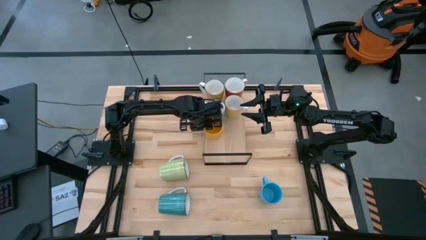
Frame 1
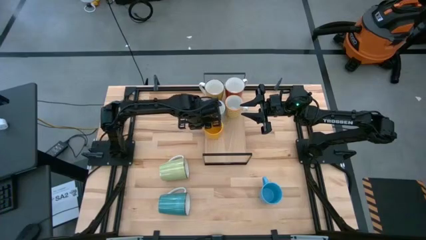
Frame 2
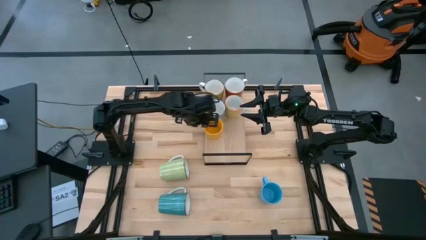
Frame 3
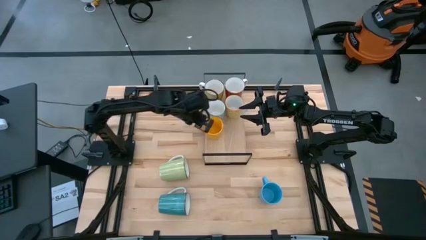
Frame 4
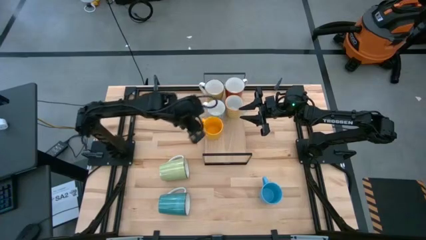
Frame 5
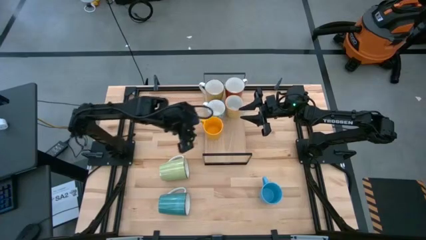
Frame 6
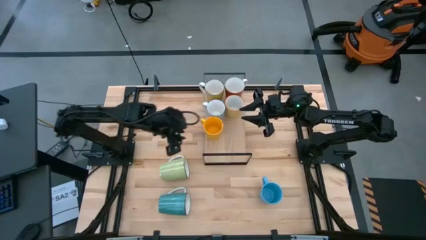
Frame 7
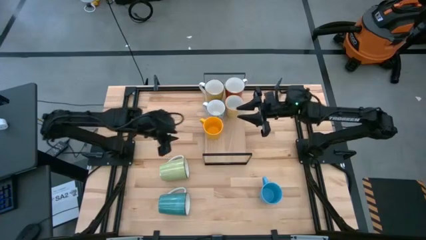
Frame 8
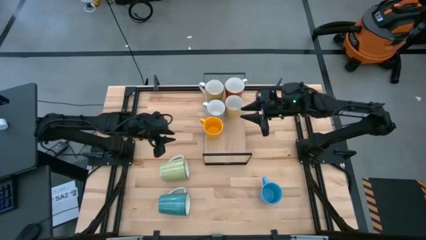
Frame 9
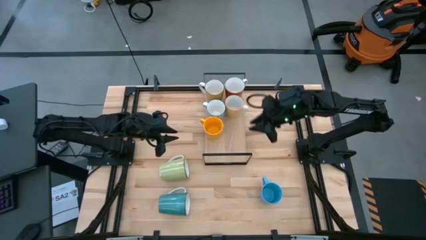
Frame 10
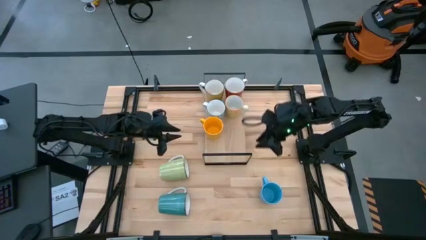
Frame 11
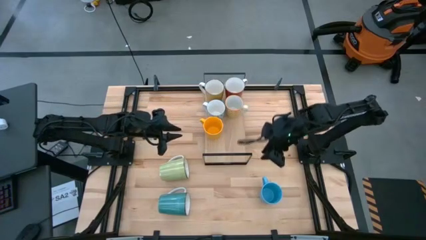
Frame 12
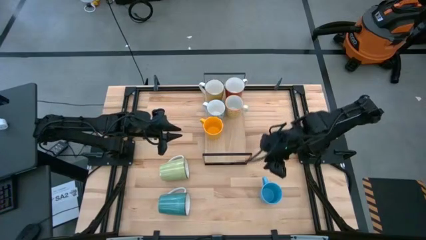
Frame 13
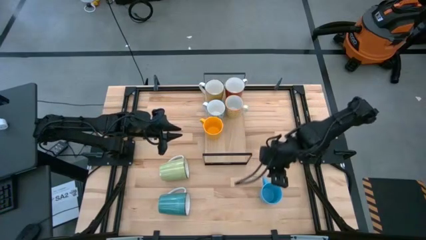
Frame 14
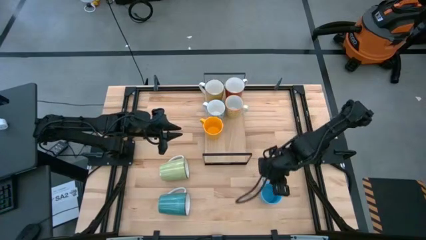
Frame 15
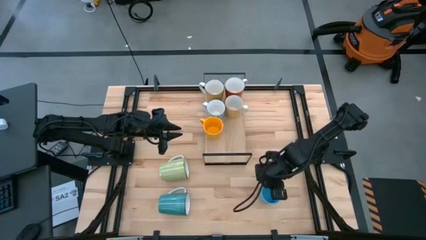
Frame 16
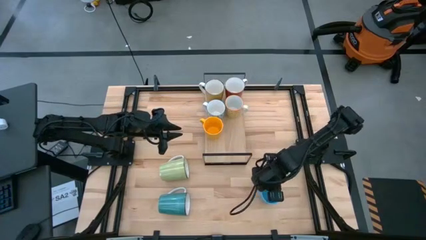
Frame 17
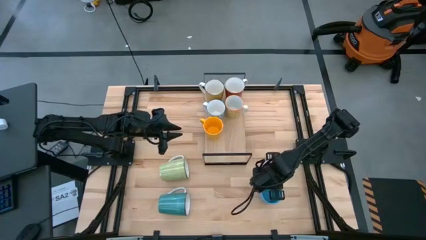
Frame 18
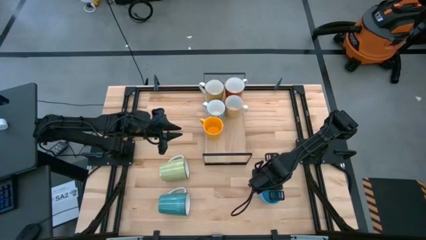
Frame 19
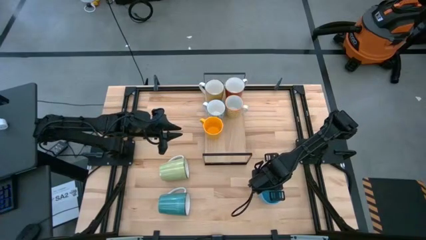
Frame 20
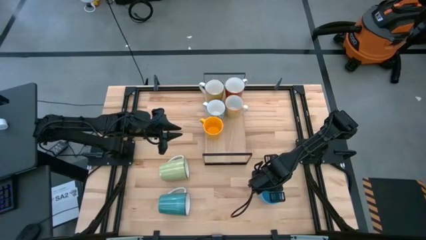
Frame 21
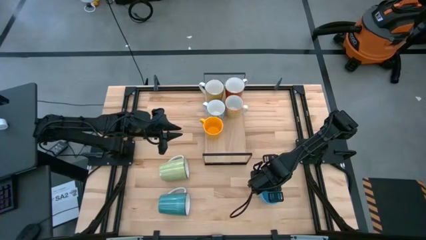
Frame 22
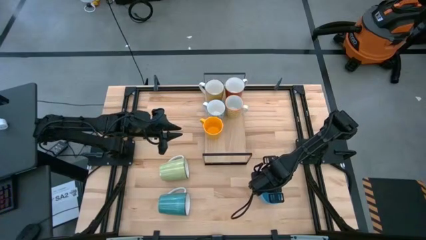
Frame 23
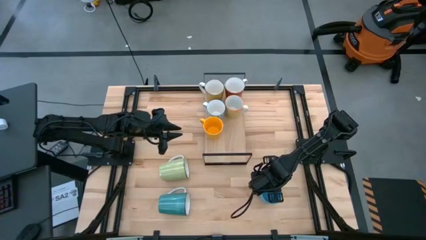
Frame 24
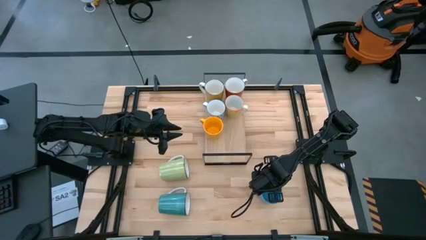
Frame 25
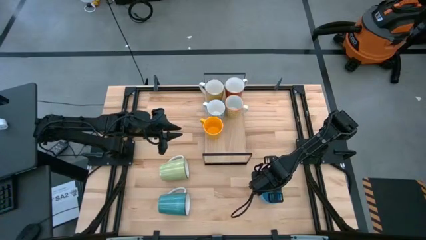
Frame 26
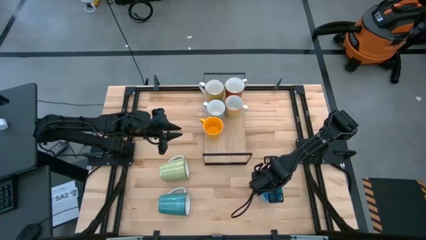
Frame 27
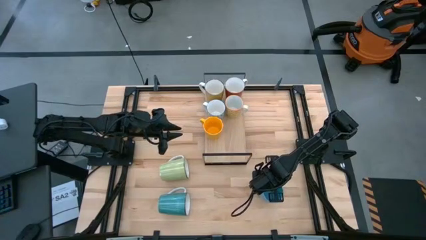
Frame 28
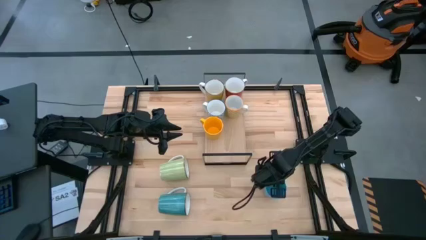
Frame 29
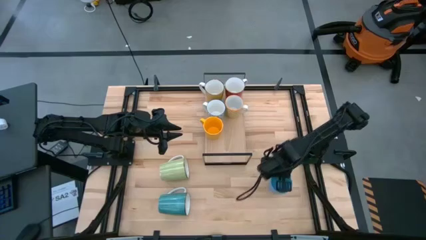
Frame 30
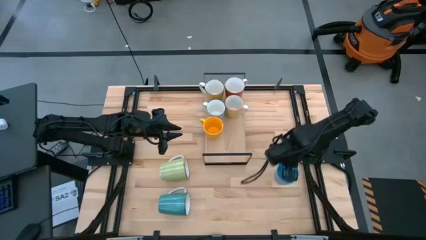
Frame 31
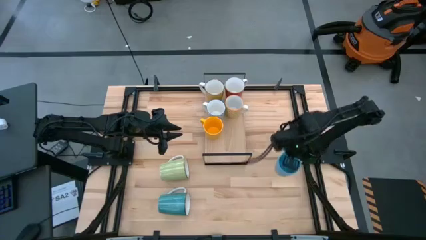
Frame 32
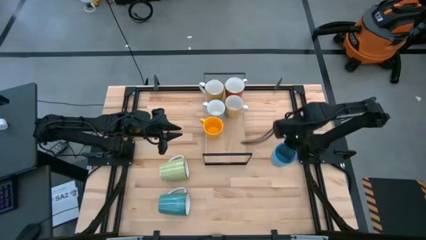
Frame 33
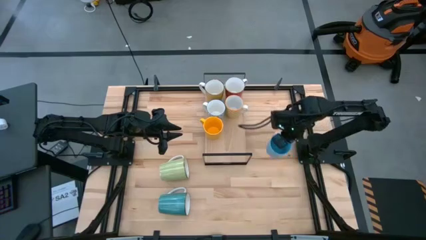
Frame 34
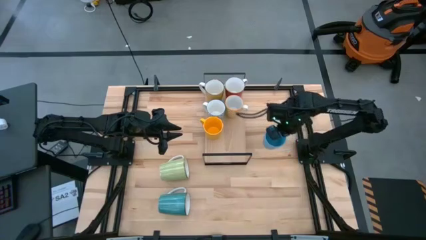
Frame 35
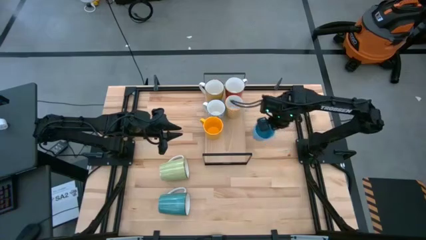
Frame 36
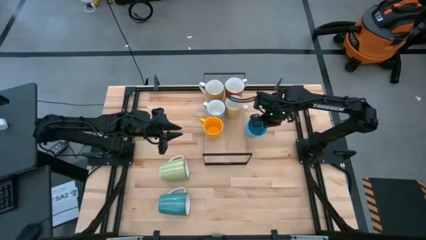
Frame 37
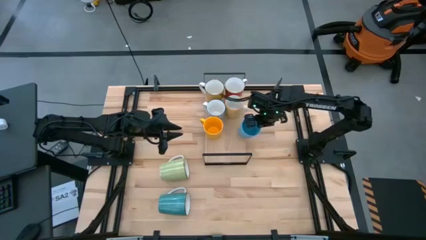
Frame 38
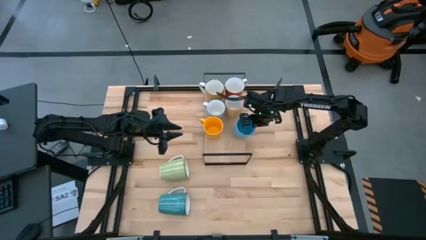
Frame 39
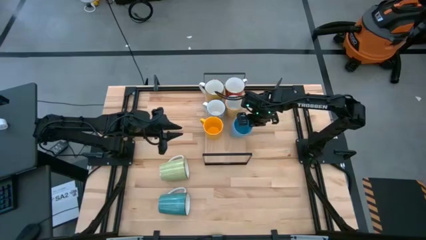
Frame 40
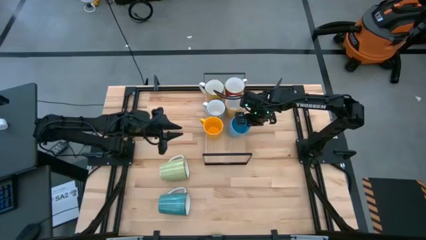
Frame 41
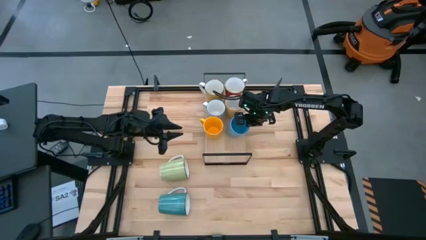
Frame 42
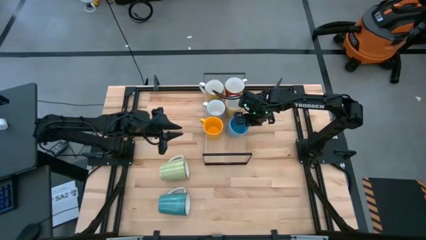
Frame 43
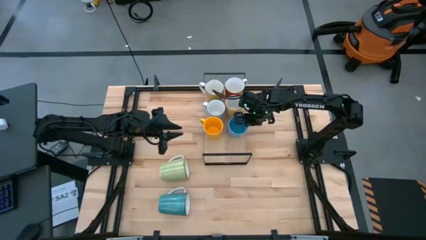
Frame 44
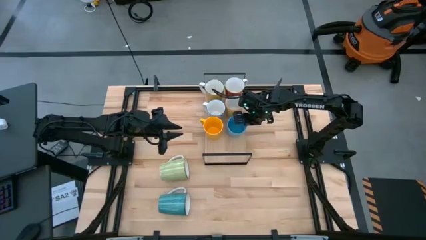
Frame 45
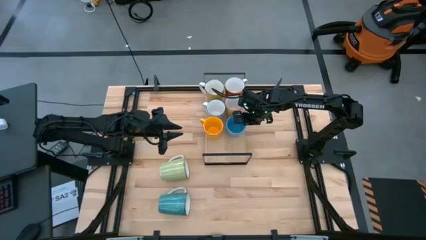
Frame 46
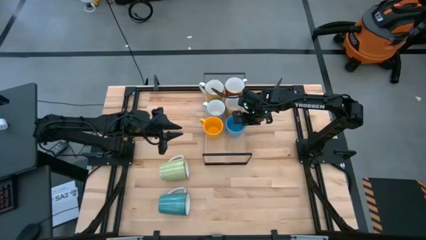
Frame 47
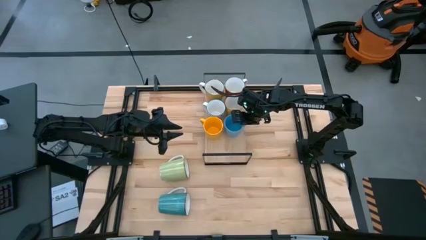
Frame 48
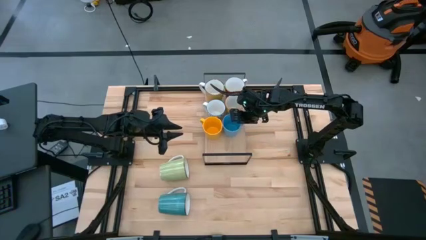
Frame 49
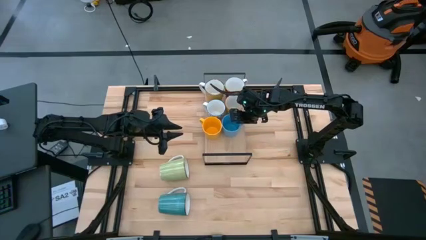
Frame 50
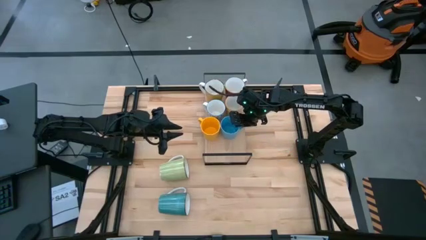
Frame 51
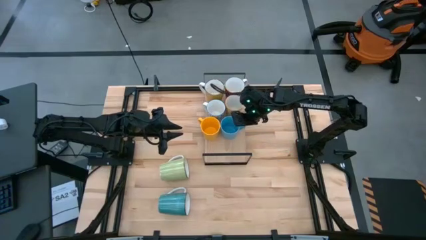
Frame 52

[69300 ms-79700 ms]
Task: Place coffee mugs
Put the blue mug on the shelf
